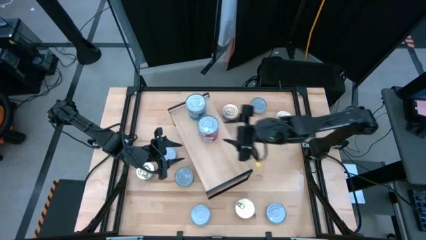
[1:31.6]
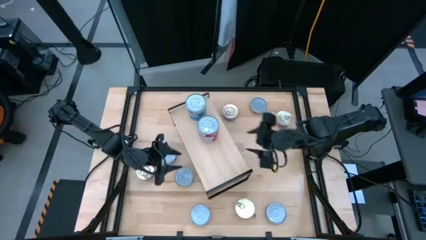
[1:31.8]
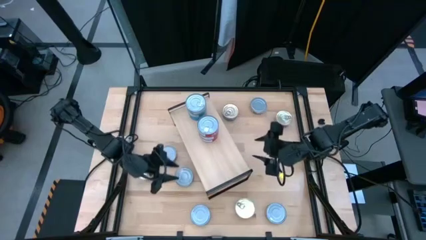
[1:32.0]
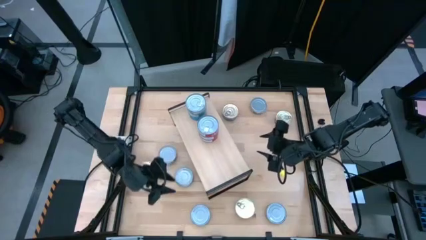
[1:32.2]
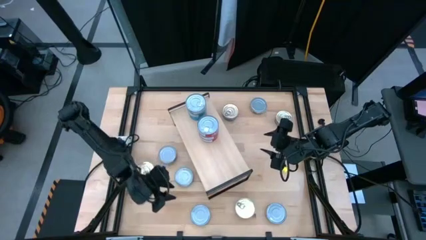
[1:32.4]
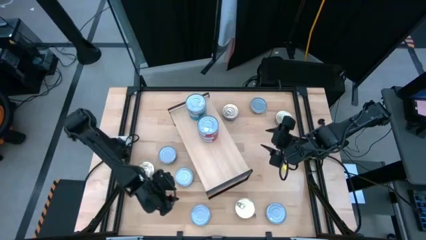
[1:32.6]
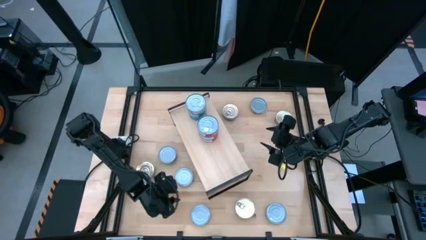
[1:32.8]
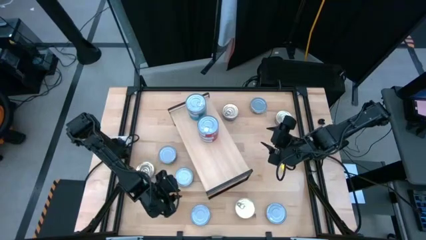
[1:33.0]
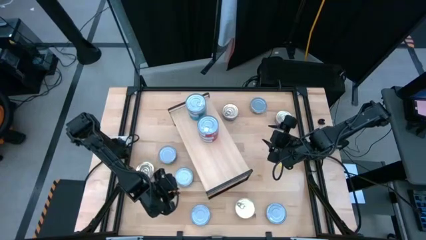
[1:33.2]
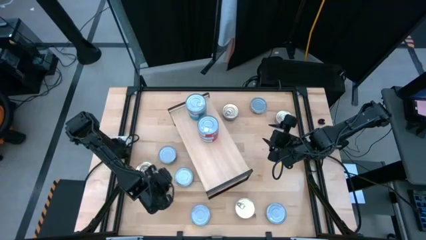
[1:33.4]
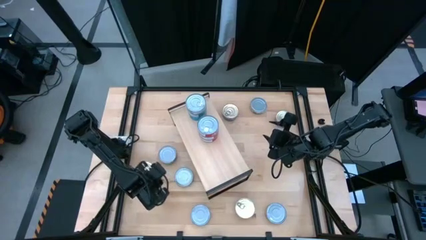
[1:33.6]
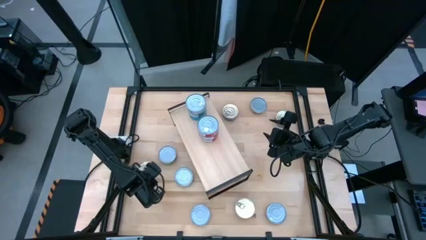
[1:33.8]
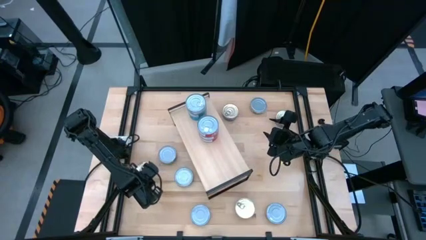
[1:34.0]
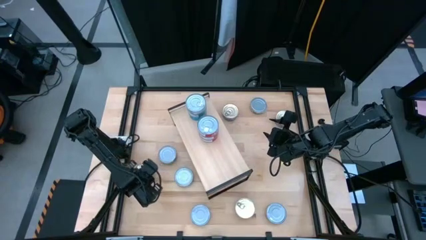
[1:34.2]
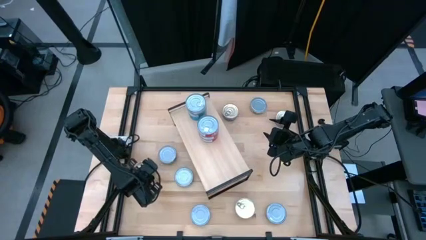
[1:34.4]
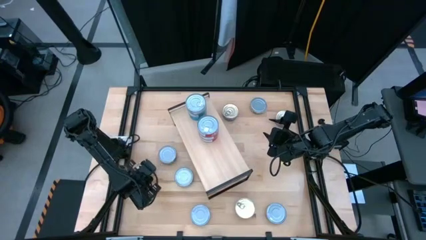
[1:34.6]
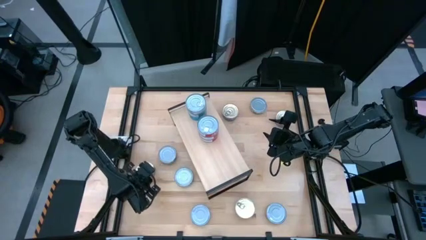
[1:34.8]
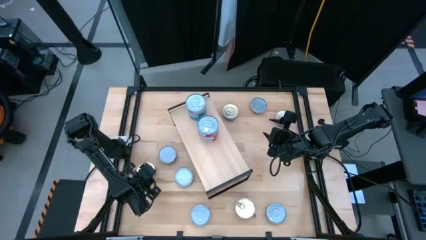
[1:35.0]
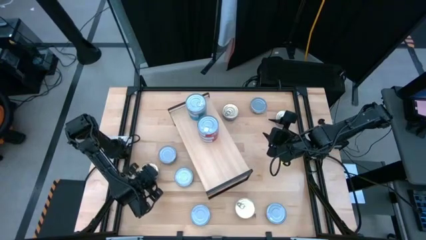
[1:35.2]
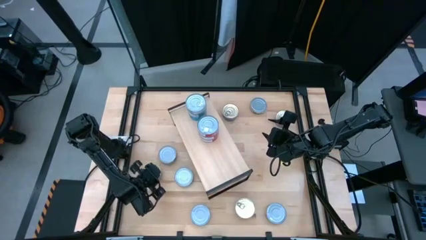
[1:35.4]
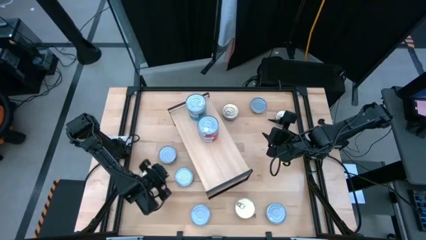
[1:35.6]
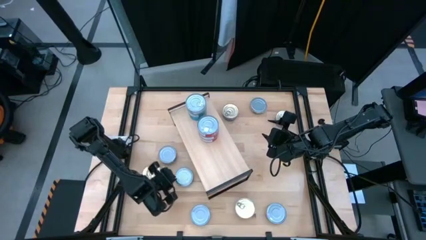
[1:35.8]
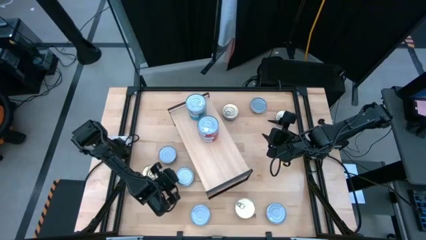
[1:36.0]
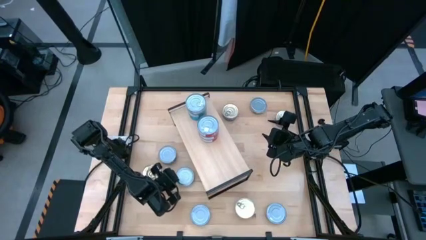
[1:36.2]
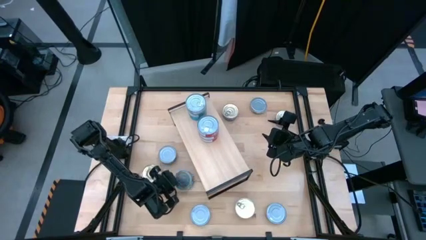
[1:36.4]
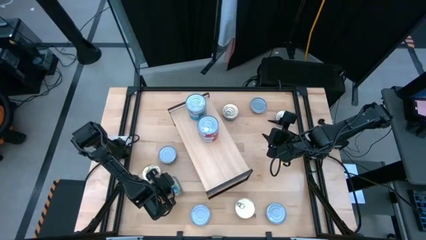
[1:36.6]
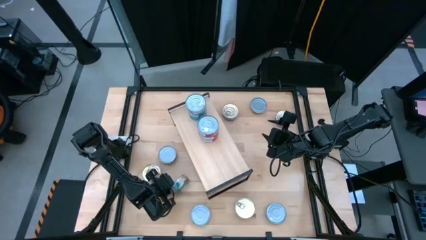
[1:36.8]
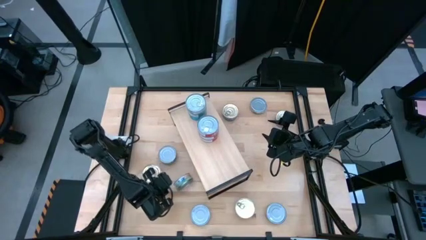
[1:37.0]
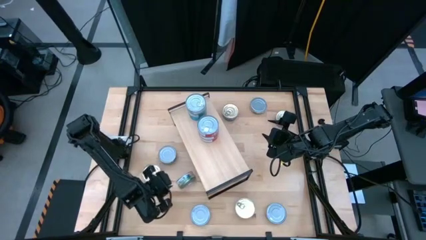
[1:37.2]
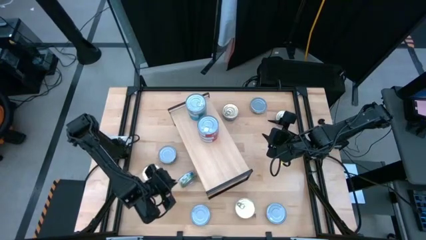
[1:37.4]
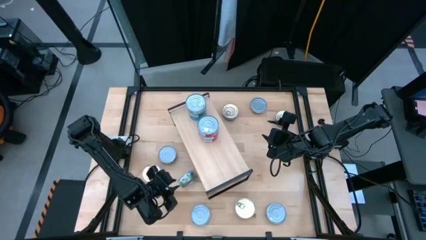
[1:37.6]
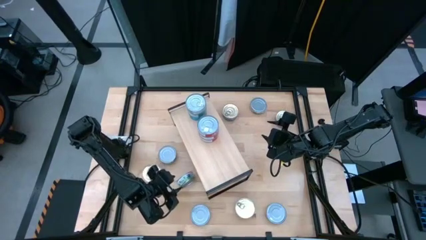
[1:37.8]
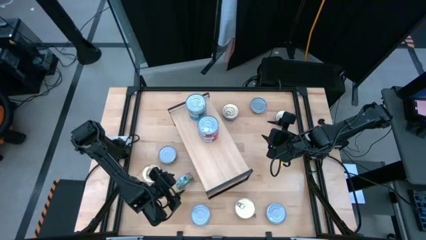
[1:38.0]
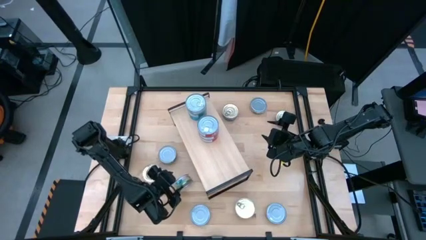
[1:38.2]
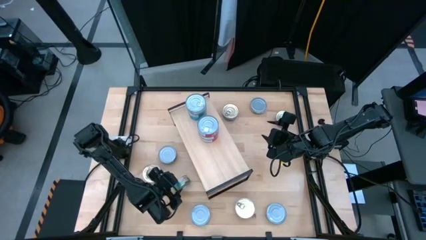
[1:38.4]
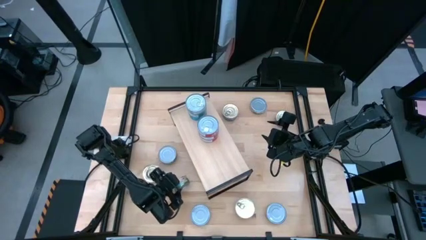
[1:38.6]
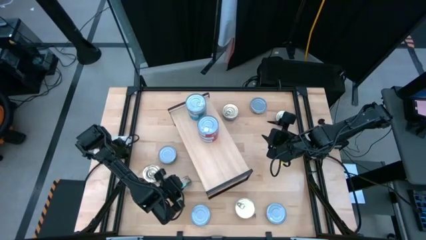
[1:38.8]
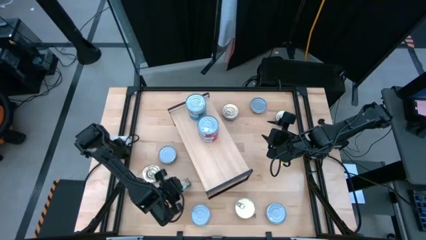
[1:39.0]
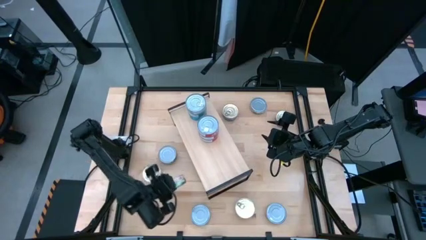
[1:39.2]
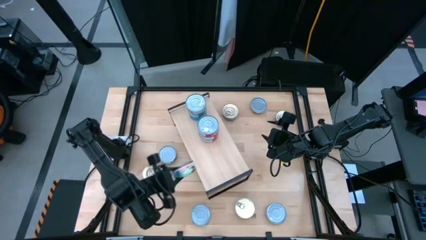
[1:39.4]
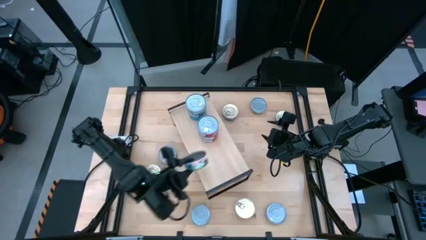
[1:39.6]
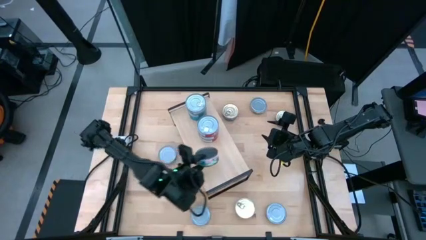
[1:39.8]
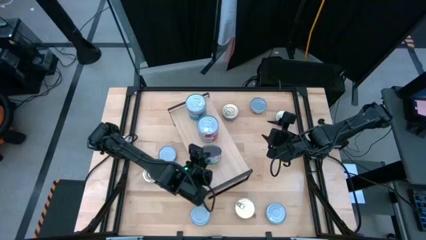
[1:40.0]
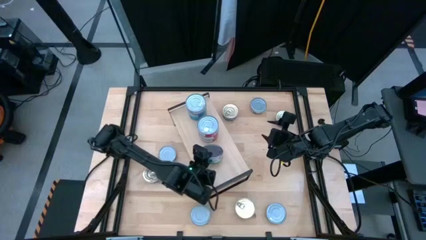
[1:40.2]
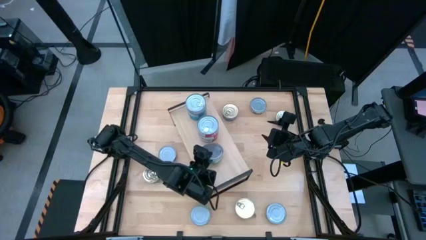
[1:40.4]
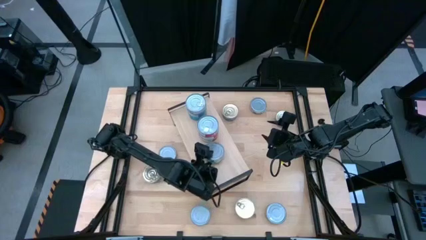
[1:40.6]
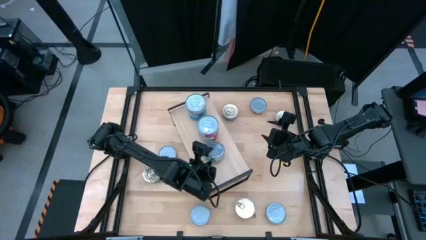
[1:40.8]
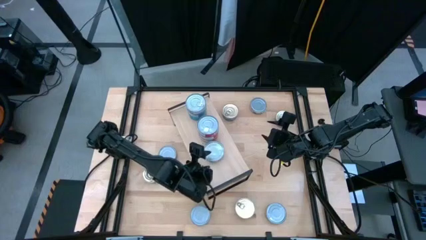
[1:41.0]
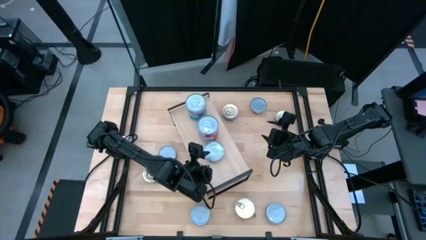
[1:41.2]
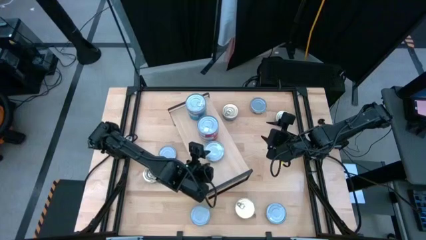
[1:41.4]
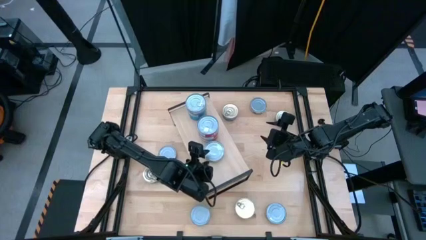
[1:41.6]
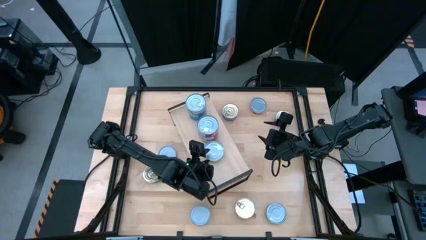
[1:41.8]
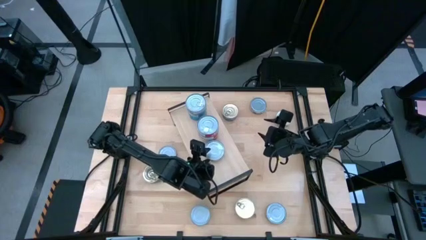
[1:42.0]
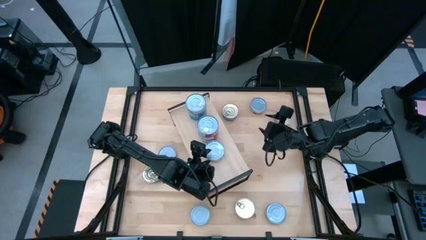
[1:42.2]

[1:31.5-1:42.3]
Task: Stack canned seafood by type on shelf
Put the green tuna can on the shelf

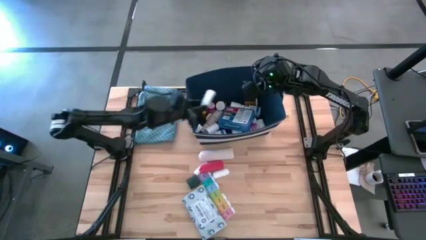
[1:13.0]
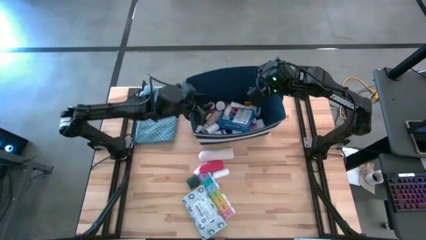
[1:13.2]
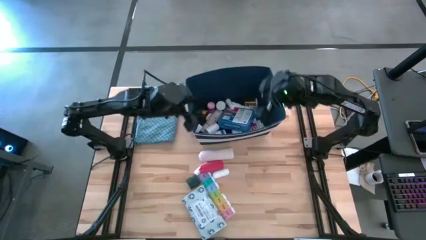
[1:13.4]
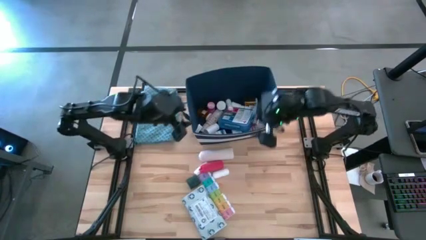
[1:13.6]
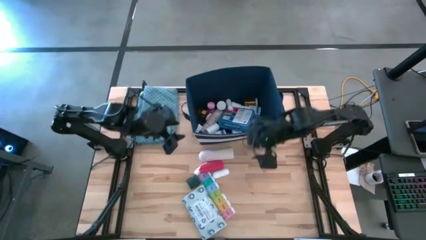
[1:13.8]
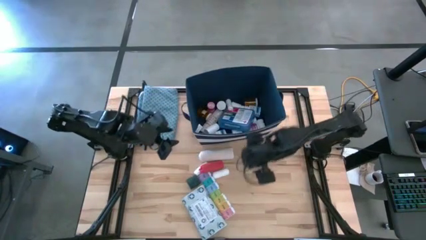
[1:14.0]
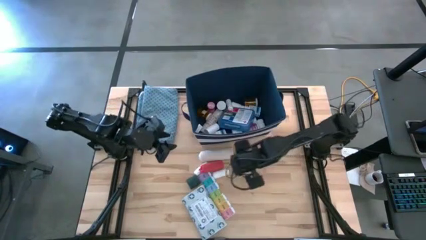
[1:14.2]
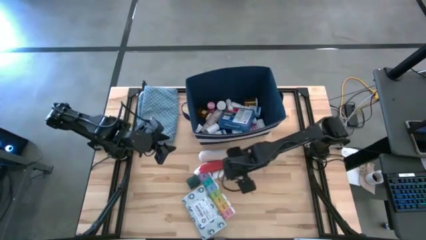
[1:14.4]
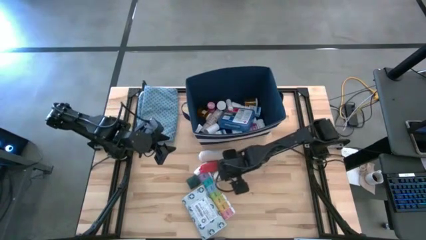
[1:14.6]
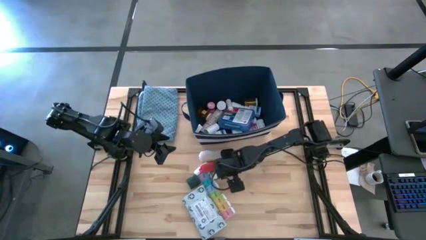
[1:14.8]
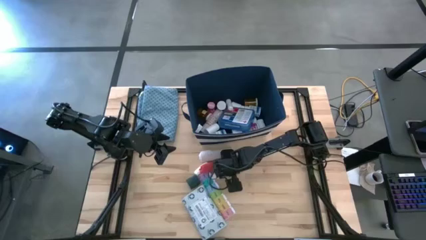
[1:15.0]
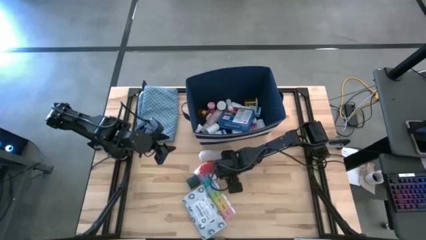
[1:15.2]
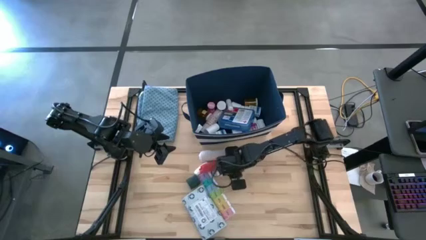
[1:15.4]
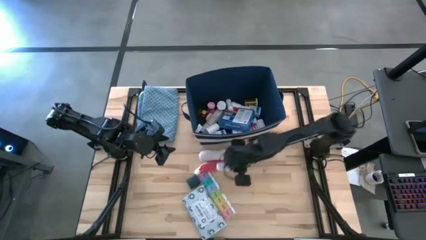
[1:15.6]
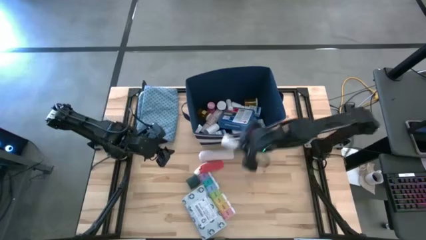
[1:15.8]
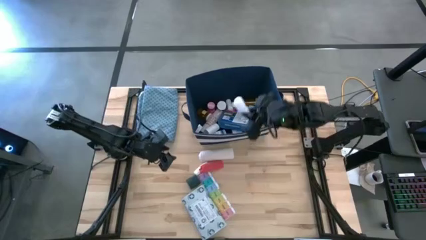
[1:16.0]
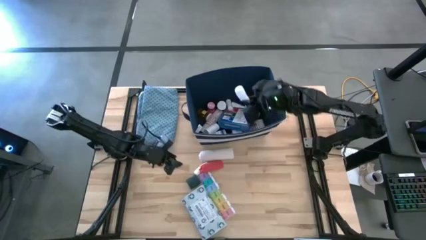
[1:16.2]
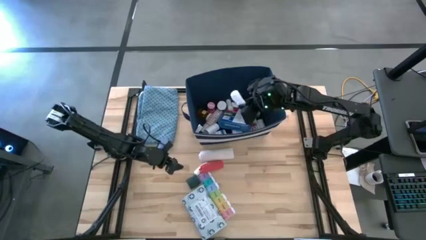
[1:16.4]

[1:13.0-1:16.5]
Task: Pick & place medical supplies in basket/bin
Put the white bandage into the blue bin

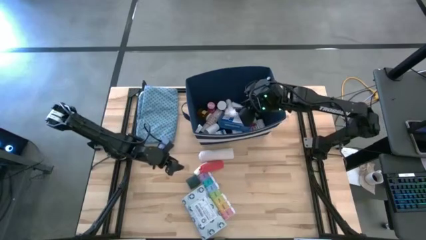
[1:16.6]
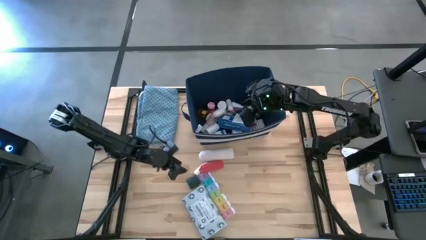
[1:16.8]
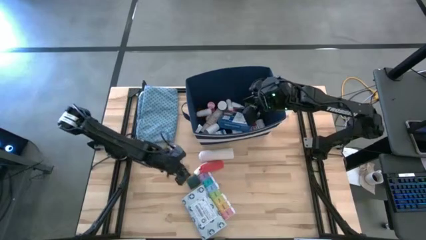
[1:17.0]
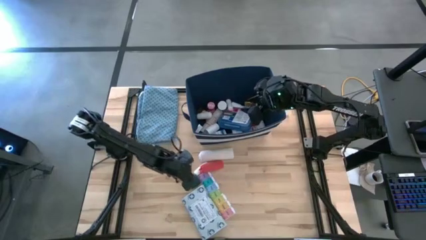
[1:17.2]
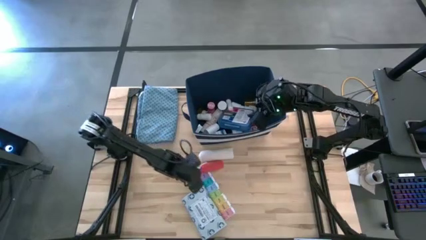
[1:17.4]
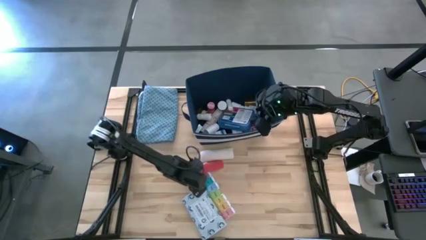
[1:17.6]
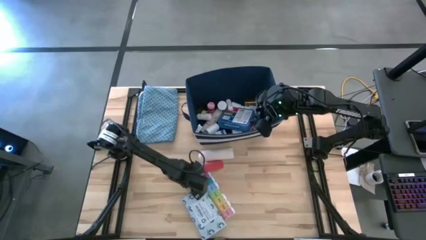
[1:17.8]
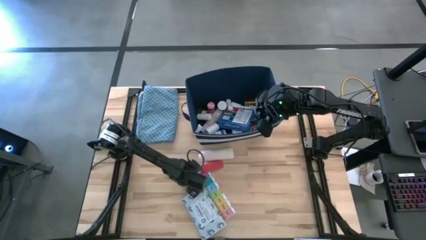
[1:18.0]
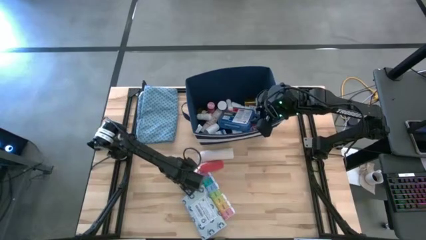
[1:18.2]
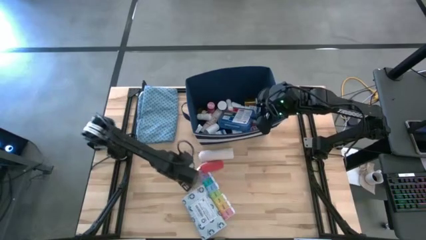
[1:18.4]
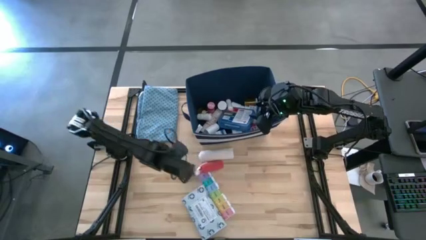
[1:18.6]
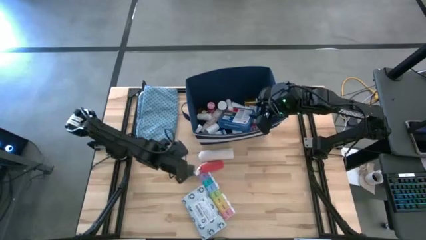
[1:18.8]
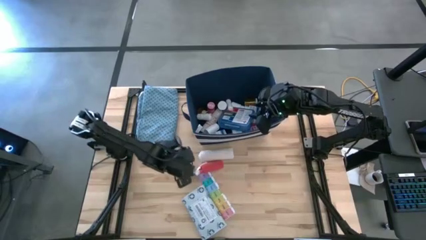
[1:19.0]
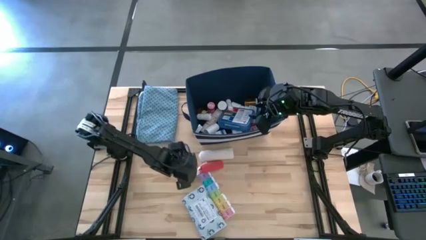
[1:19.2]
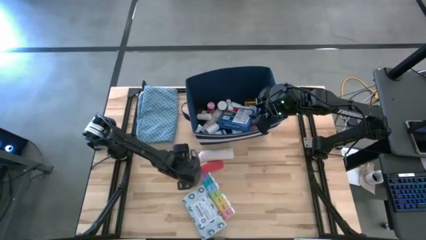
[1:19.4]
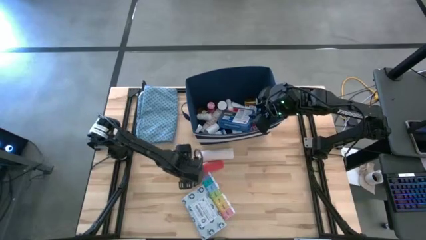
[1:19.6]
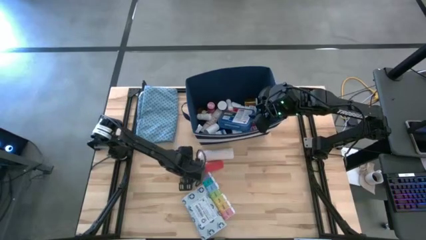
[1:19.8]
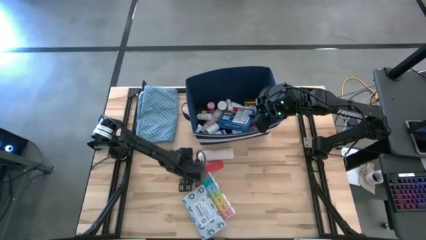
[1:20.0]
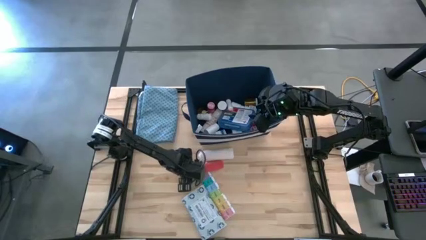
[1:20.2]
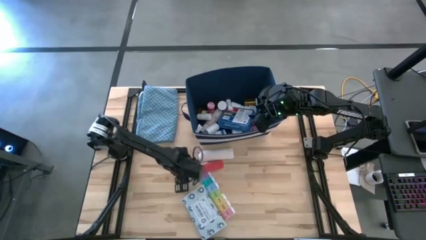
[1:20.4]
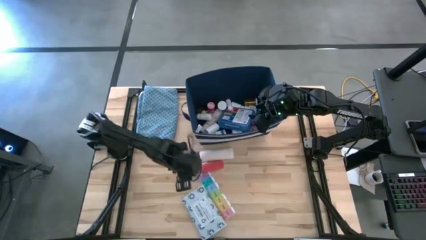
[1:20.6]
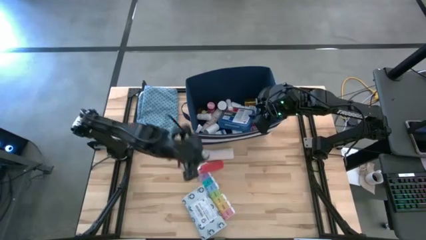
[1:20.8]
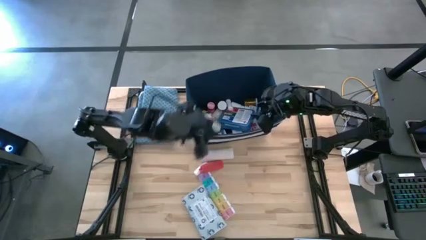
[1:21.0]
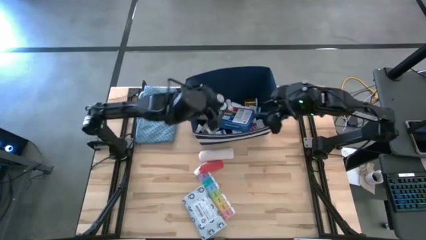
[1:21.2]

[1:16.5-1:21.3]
Put the dark green bandage into the blue bin
